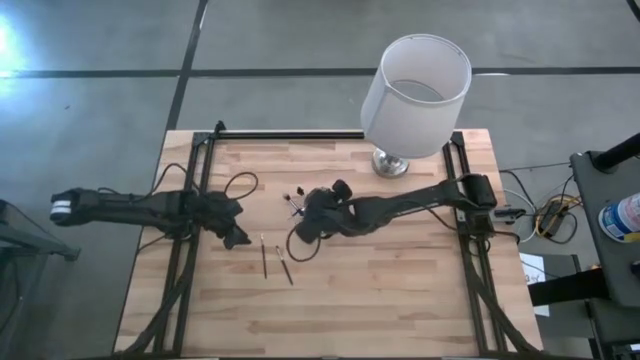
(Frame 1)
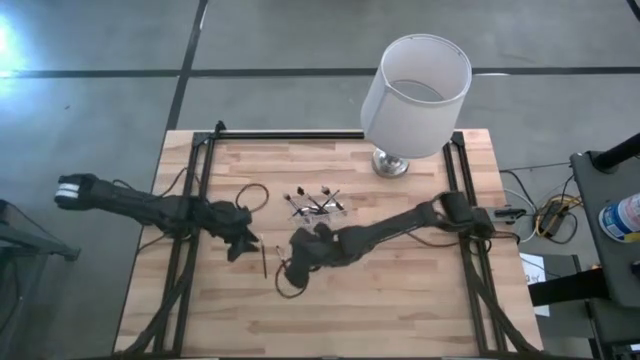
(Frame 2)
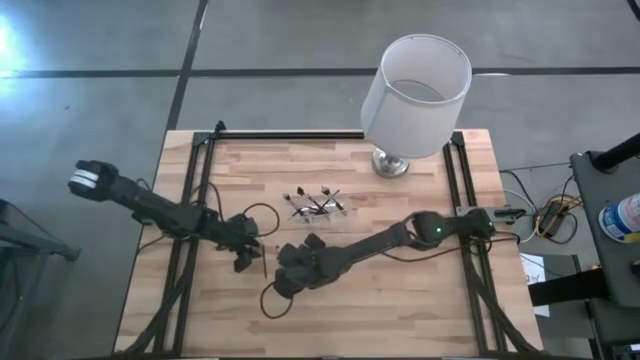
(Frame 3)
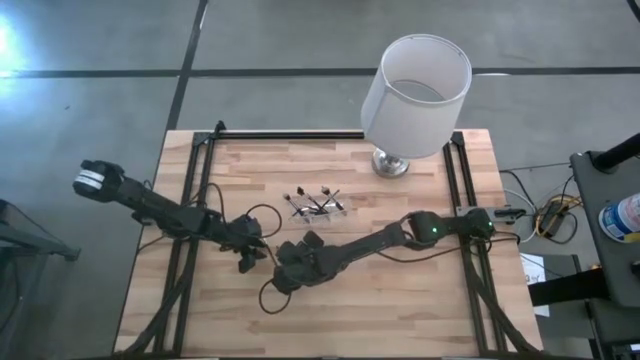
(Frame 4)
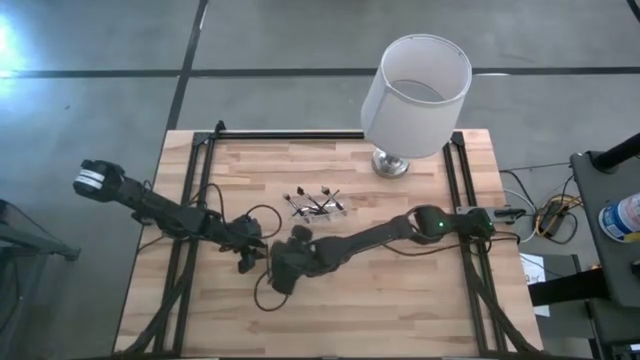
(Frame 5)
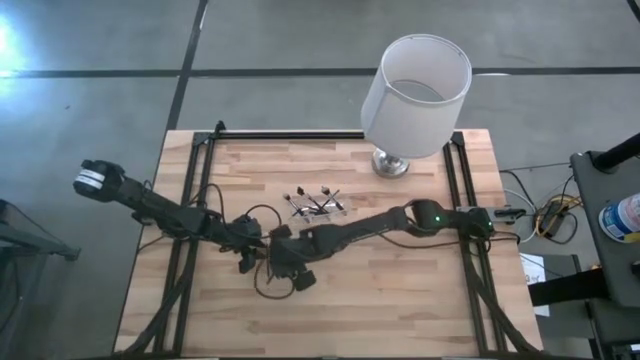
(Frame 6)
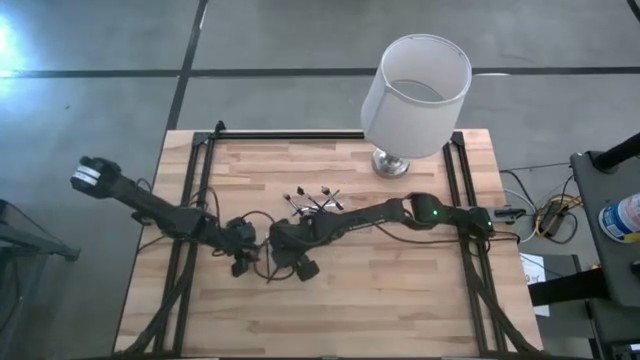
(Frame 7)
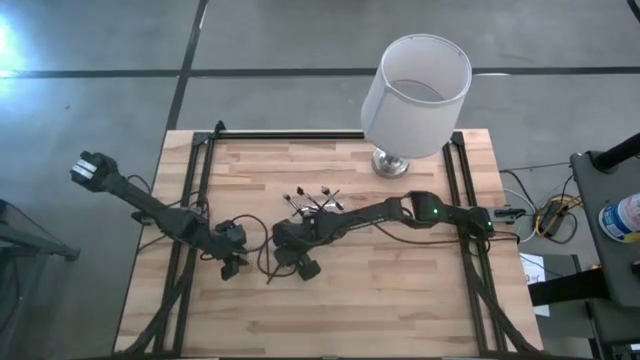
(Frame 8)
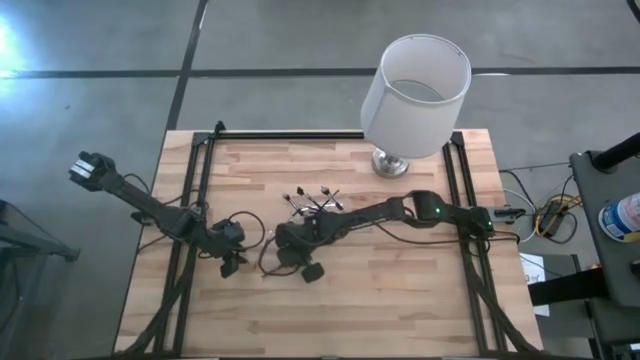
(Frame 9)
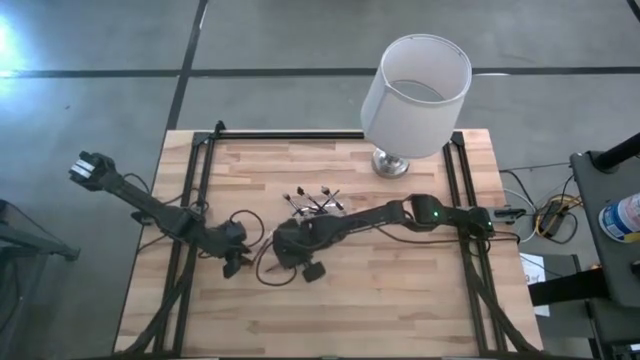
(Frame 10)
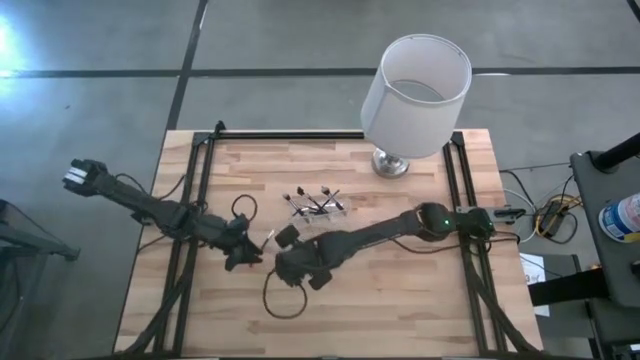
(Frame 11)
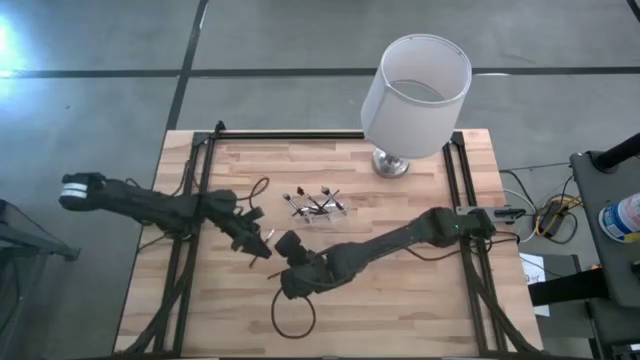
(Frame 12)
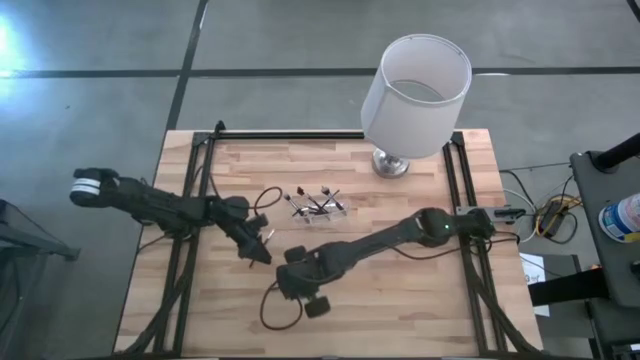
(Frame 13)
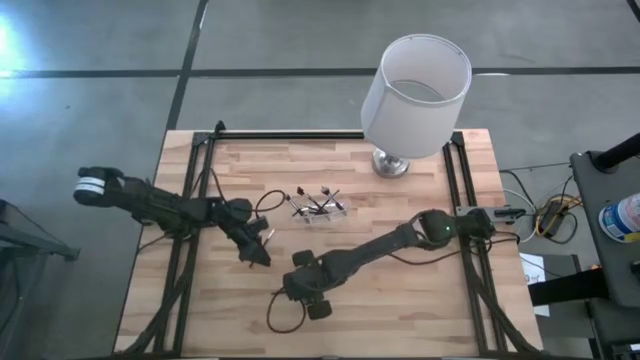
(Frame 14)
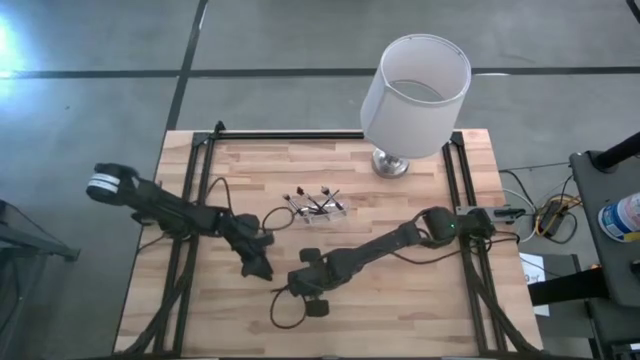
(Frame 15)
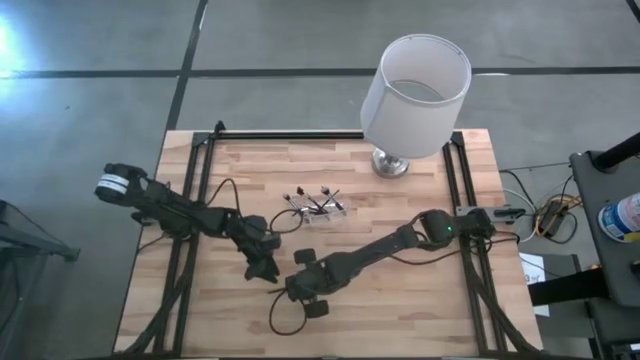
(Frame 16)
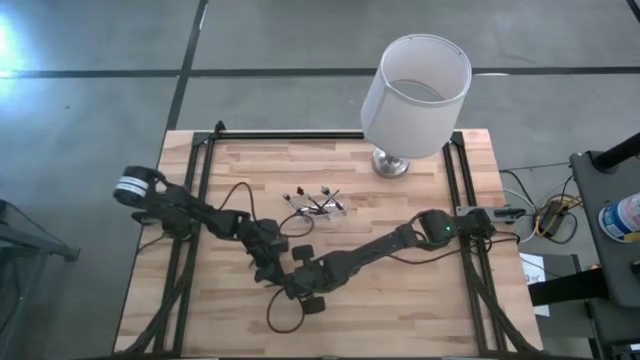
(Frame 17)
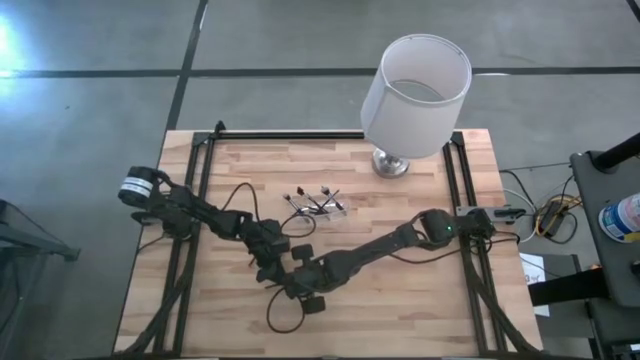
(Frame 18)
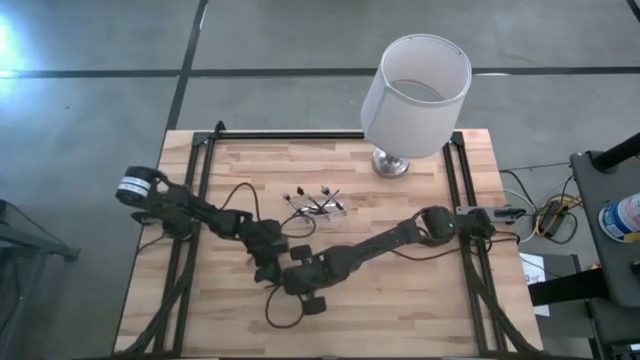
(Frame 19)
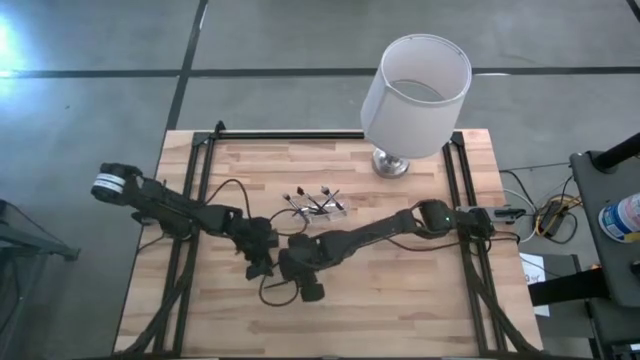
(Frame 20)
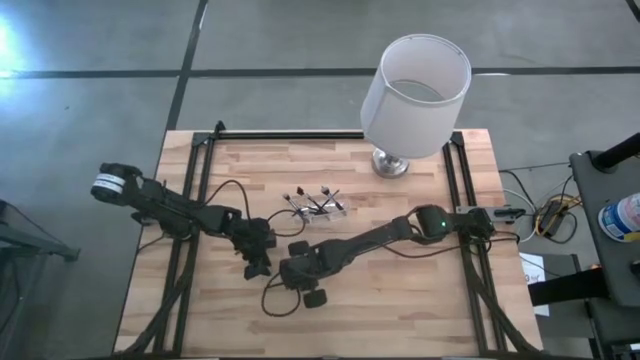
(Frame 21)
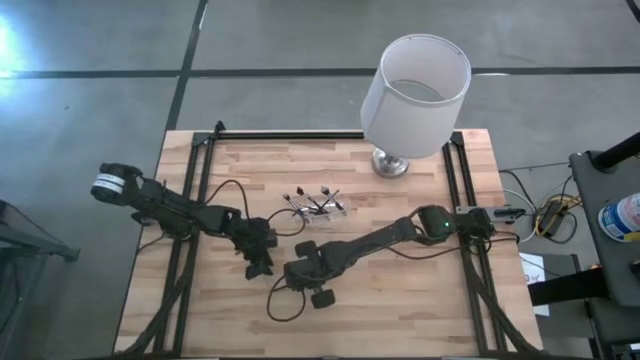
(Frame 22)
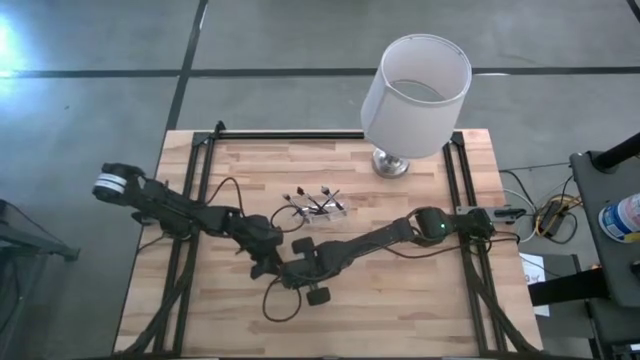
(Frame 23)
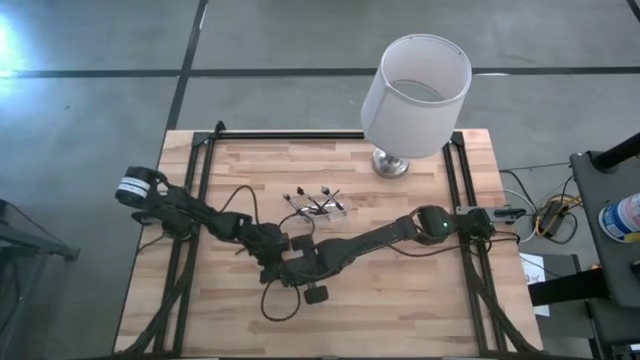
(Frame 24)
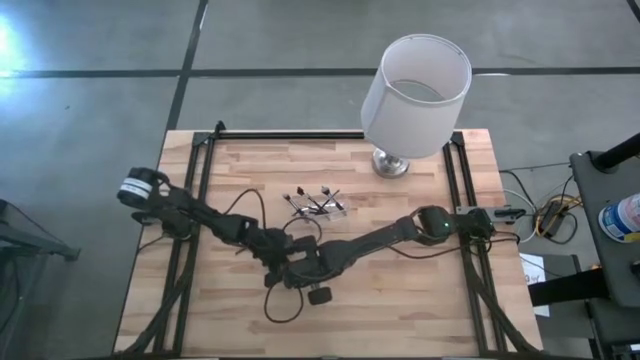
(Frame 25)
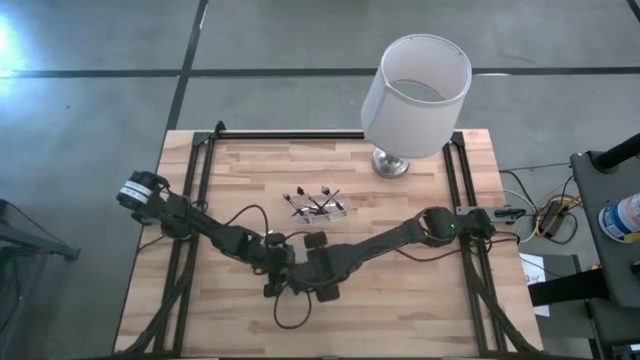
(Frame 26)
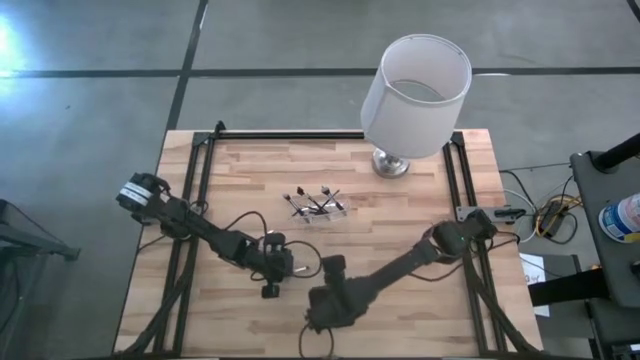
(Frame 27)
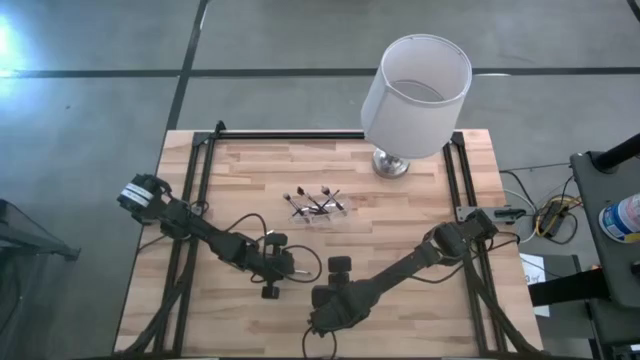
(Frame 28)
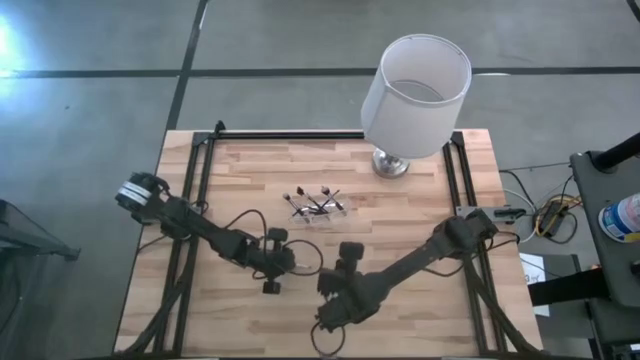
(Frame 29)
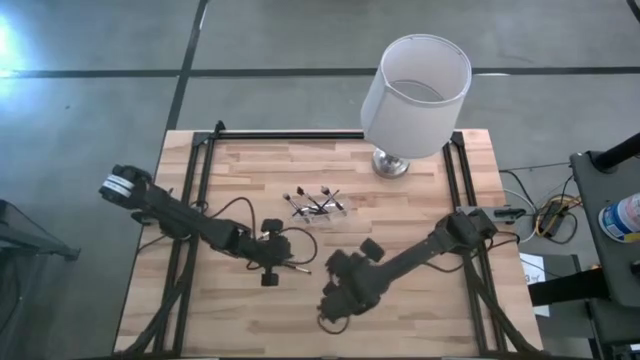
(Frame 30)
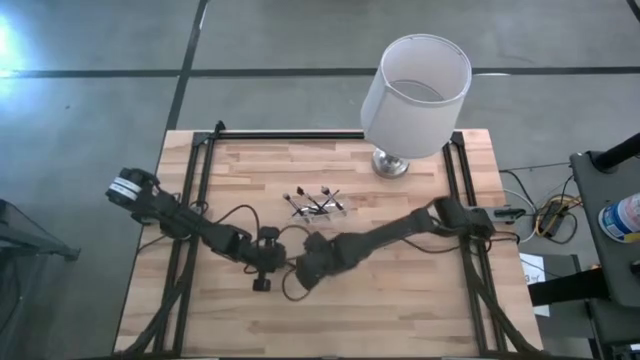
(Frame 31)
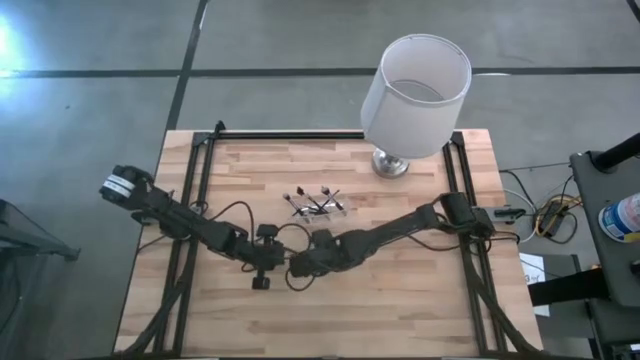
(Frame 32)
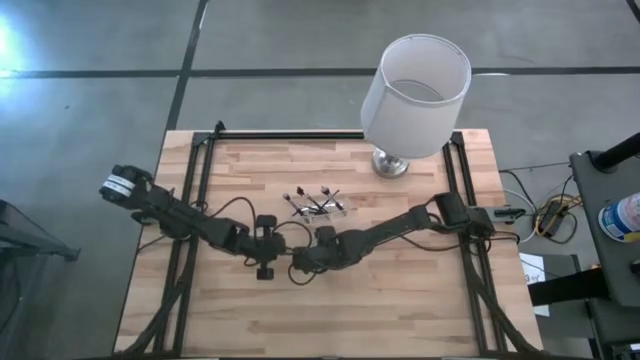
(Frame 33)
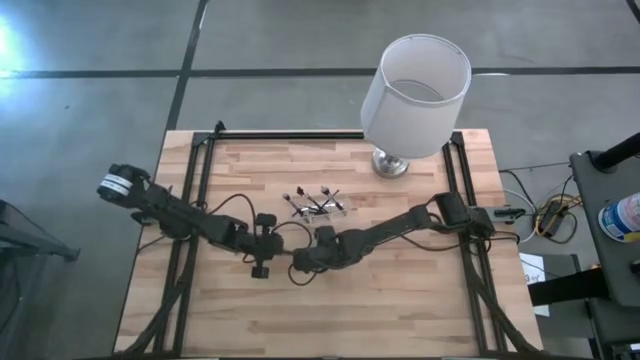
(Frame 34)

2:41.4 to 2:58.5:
Task: Put items in baskets/containers
Put the foundation brush into the transparent organizer

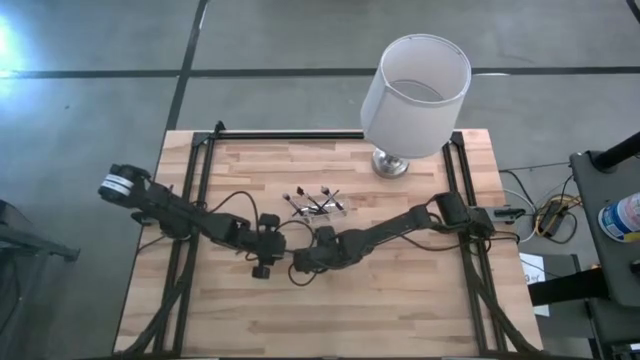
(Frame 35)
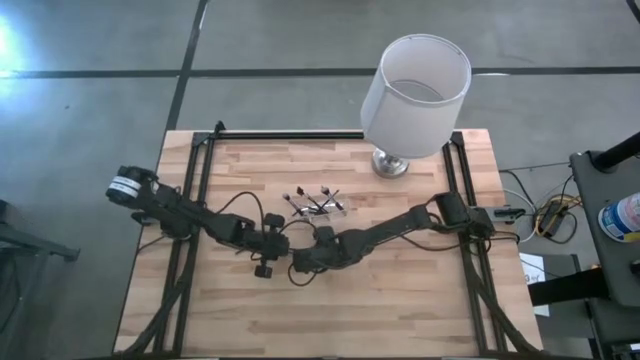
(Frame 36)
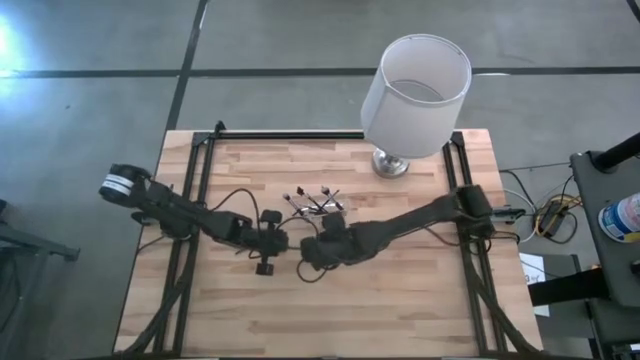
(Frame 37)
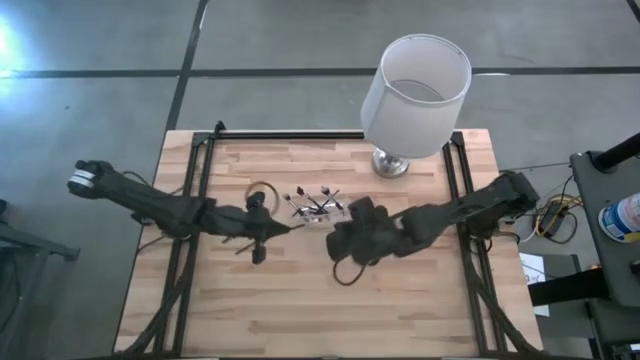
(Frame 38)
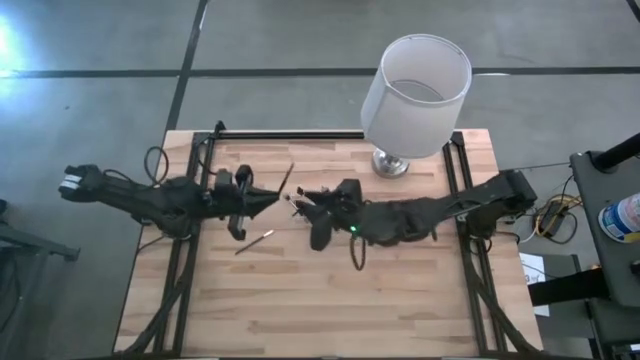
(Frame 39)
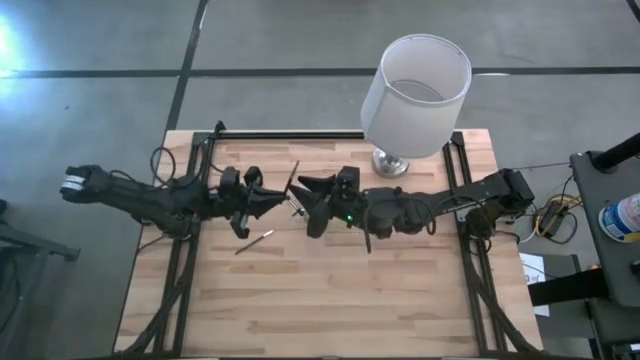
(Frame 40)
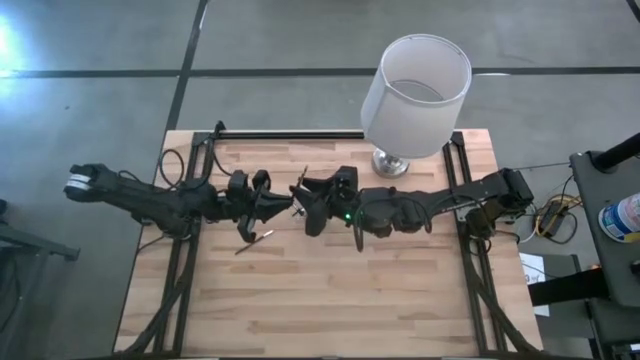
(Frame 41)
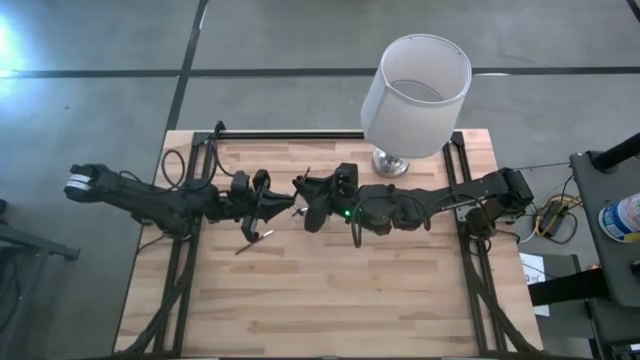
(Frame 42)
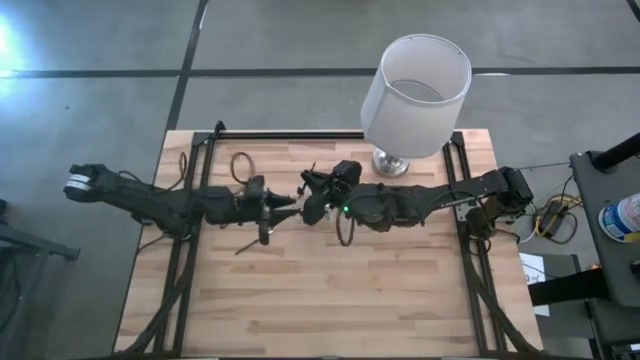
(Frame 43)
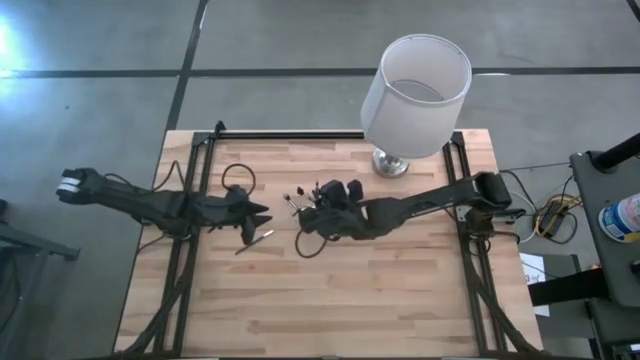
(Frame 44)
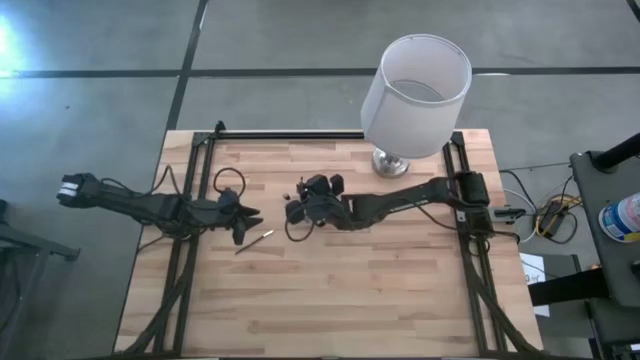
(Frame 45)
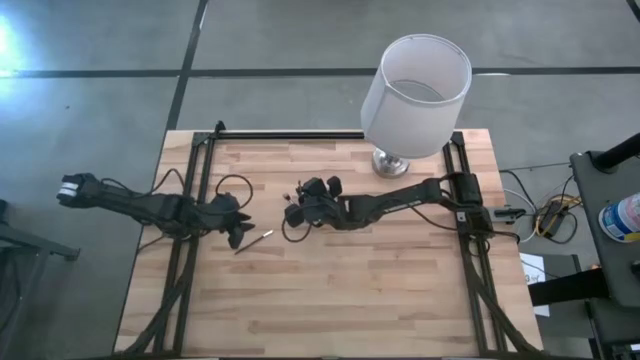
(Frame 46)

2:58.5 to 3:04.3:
Put the foundation brush into the transparent organizer
